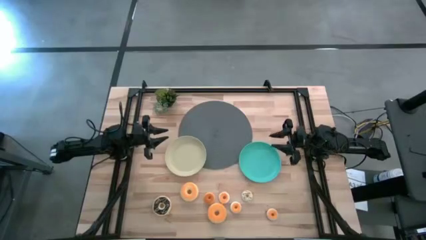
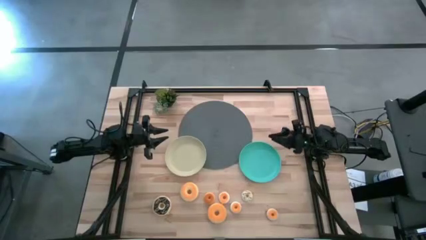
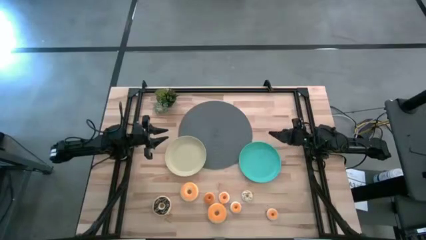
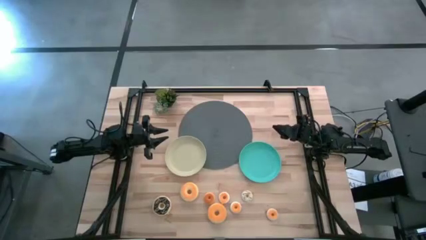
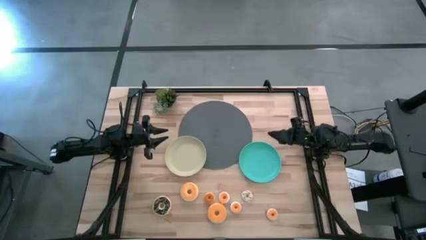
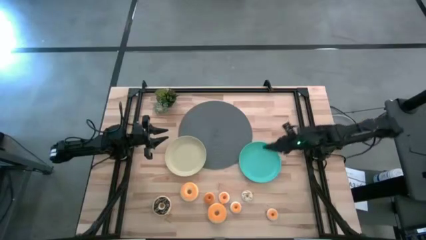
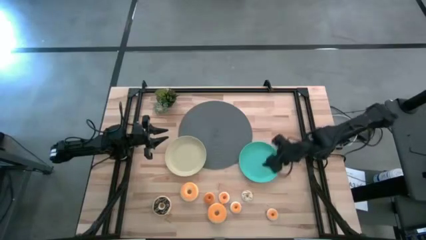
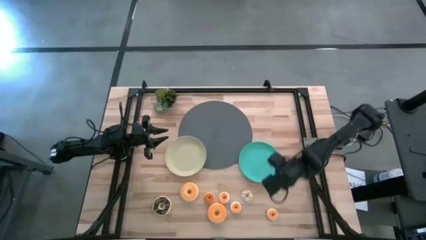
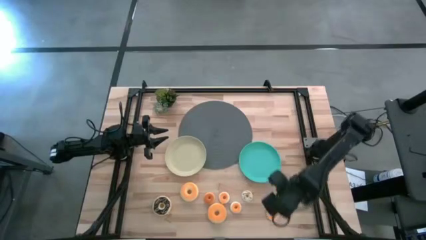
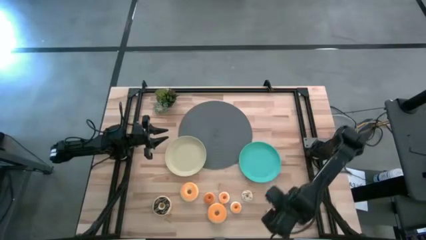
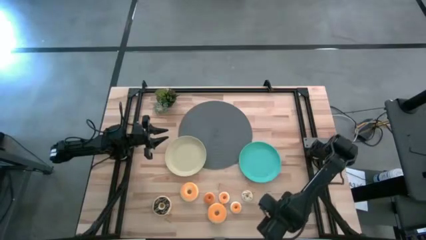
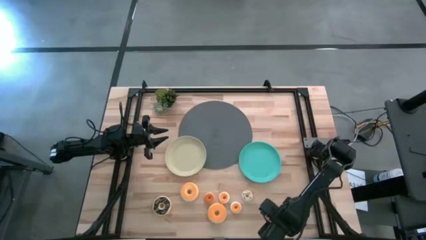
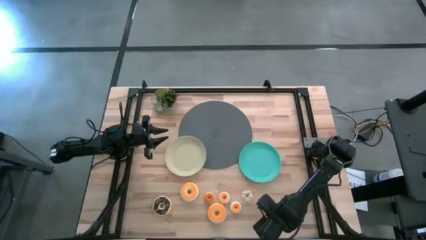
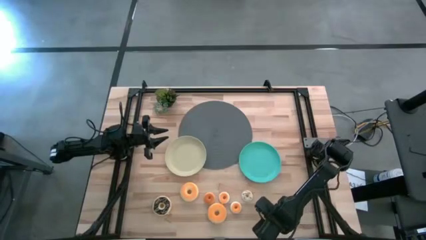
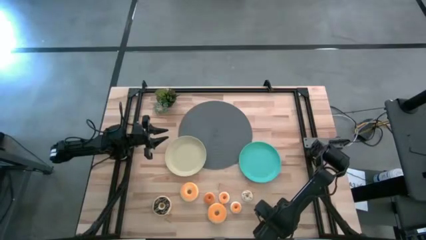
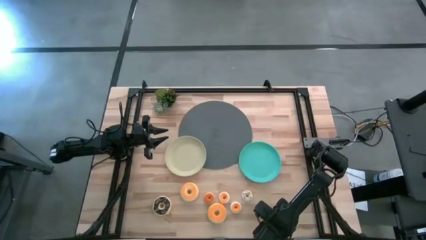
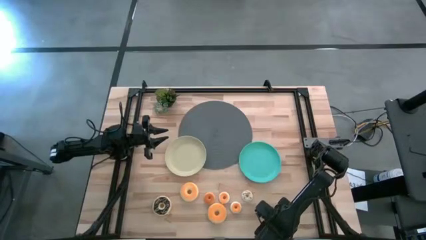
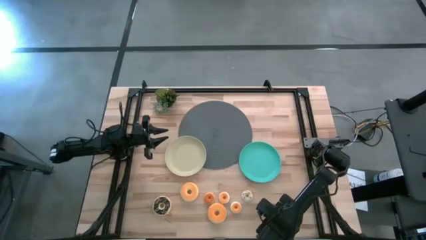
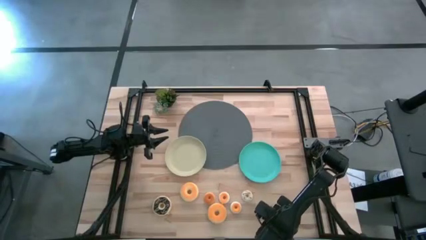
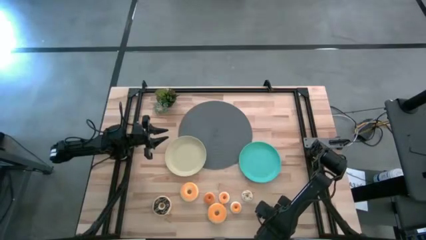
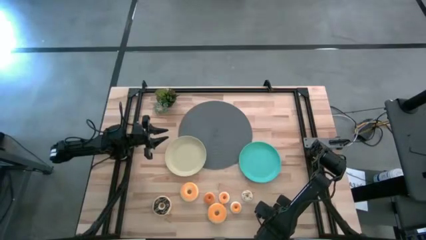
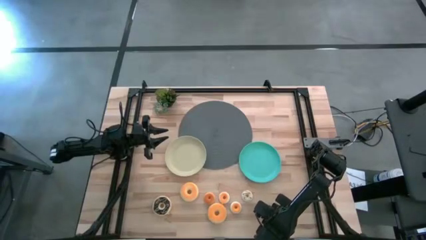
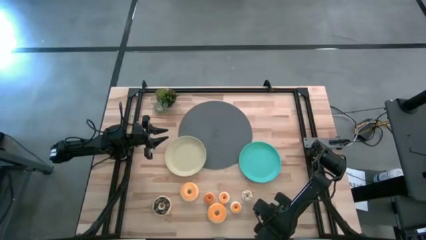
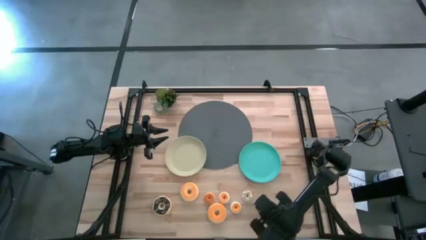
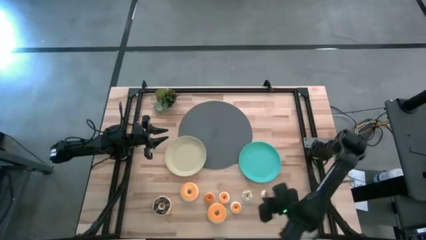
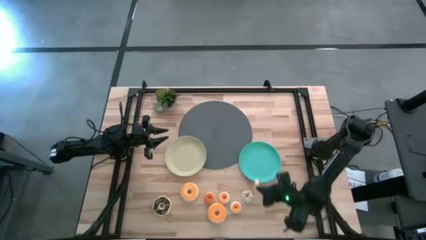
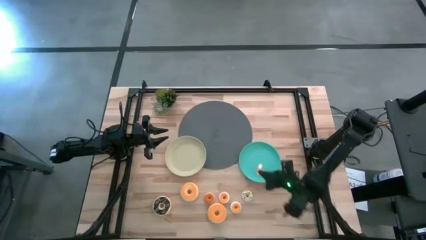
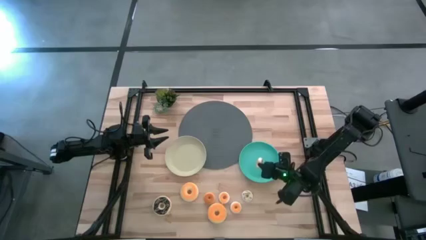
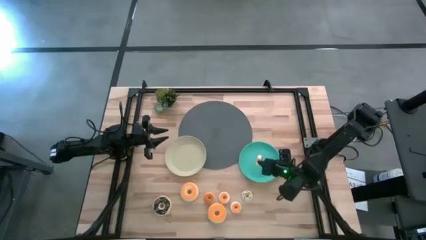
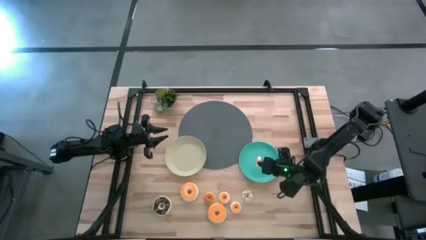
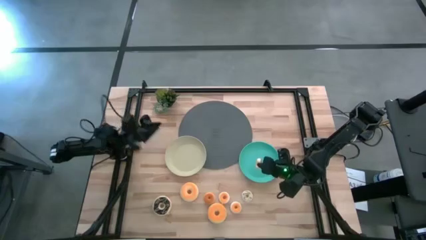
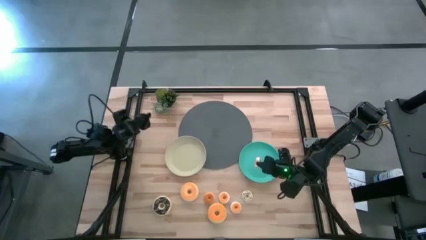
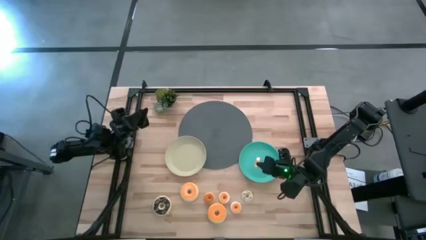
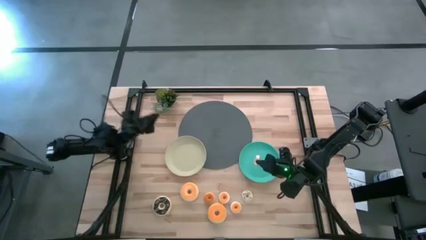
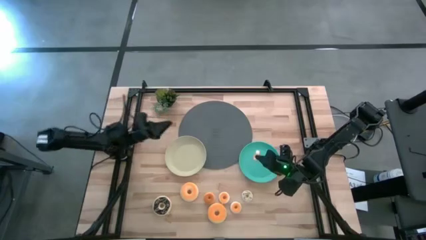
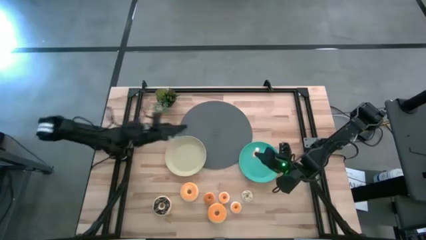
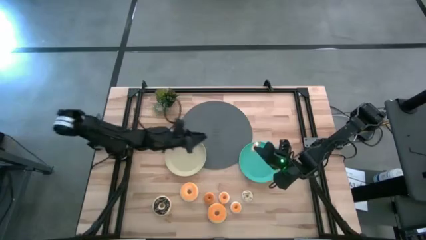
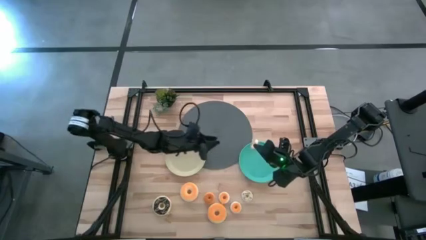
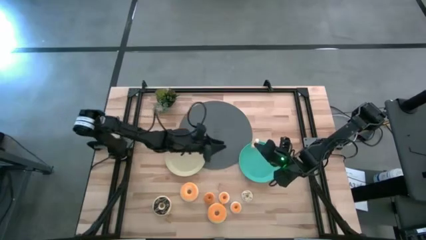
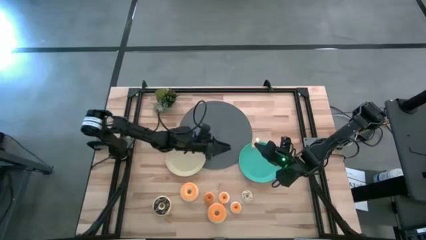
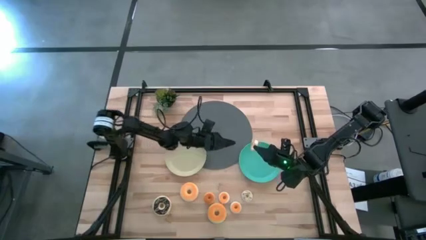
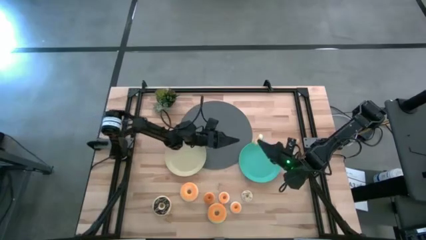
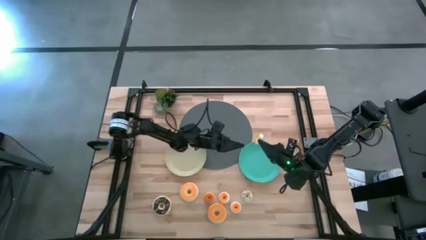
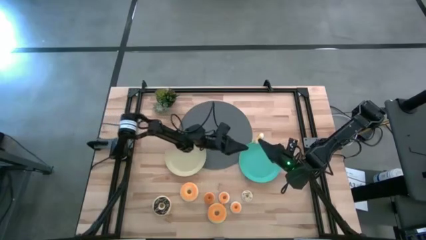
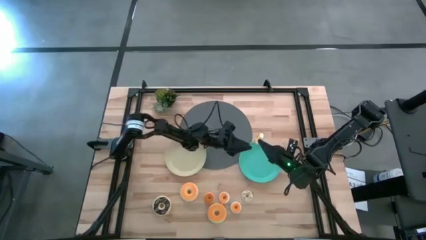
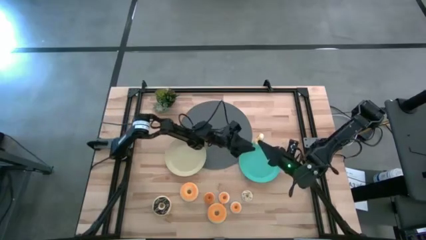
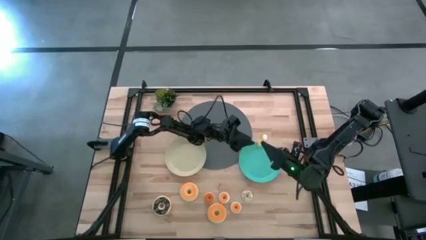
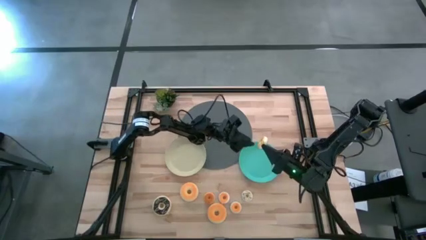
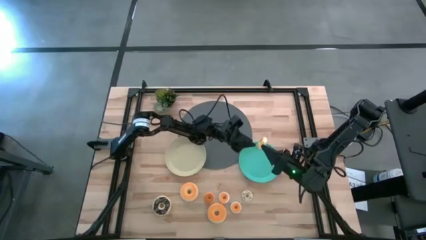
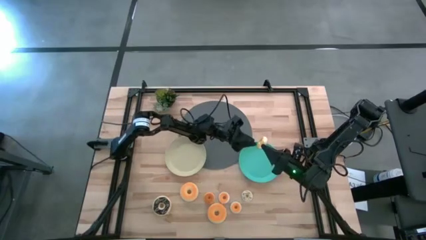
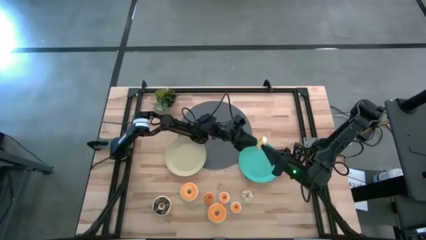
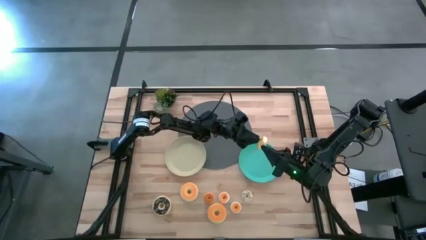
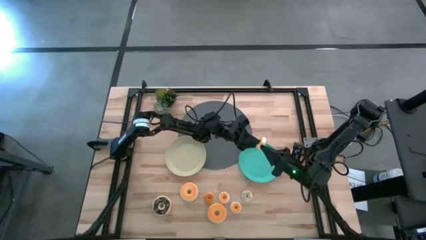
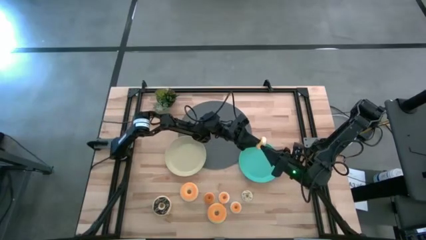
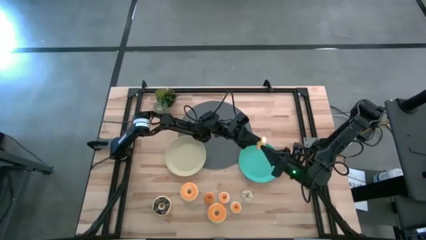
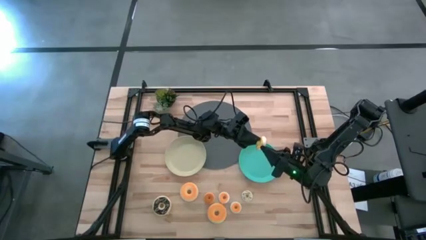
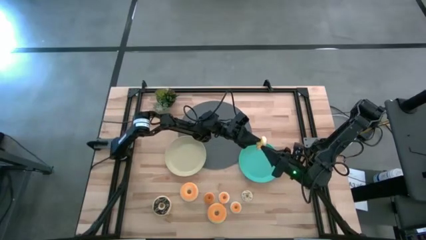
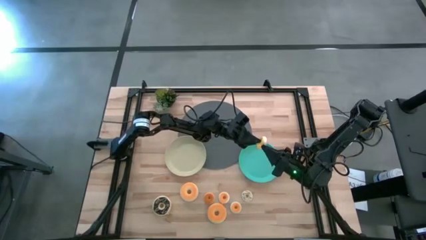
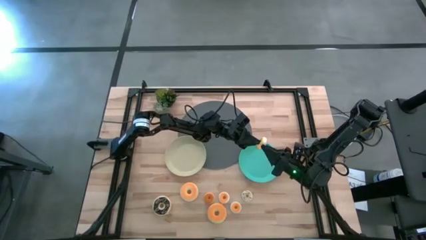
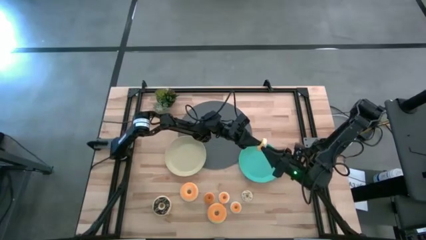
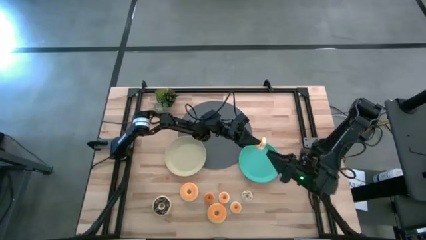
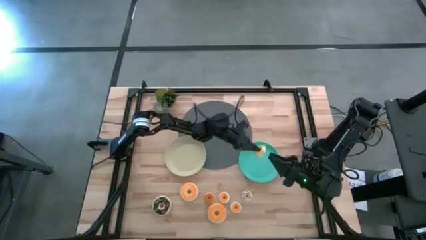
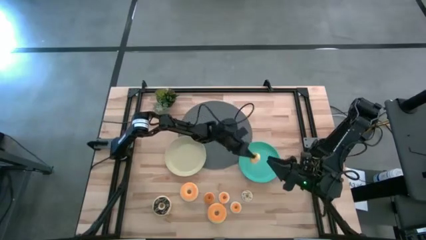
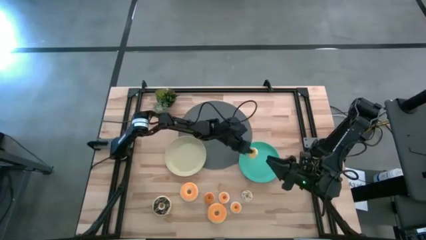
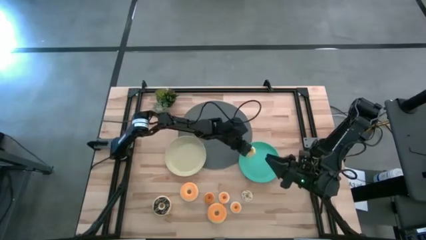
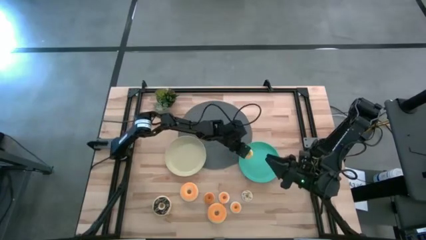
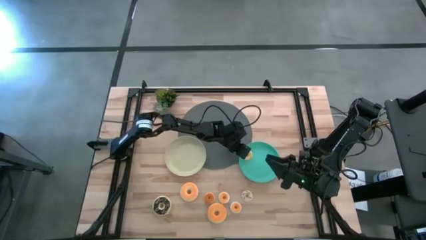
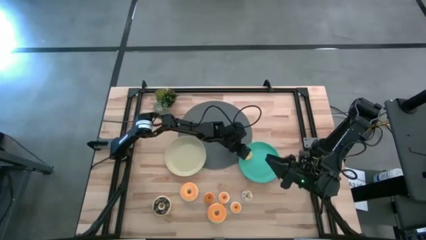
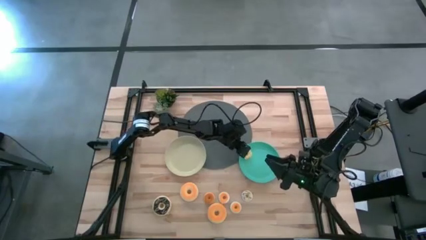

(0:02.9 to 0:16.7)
Task: Pick & Place donuts
Put the small yellow donut on the green plate
